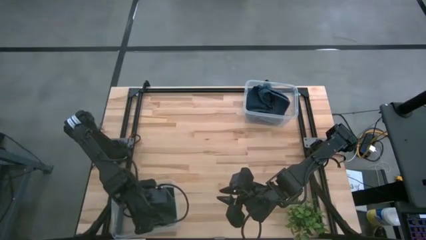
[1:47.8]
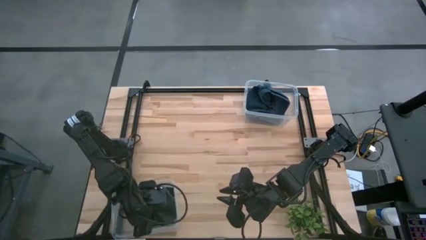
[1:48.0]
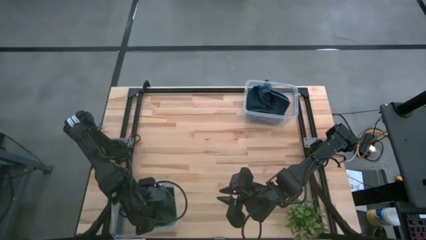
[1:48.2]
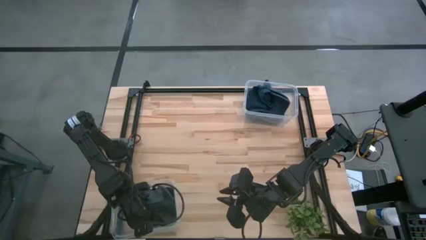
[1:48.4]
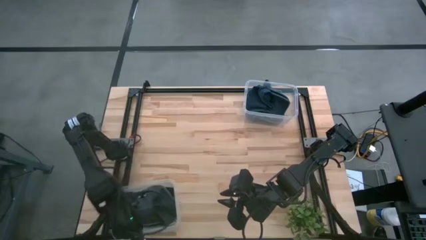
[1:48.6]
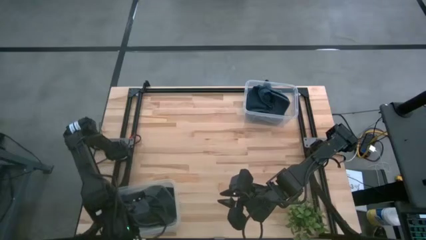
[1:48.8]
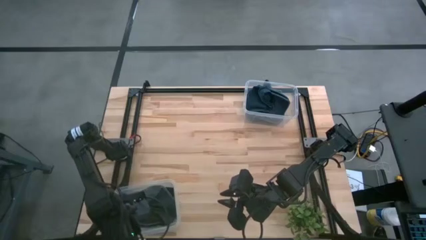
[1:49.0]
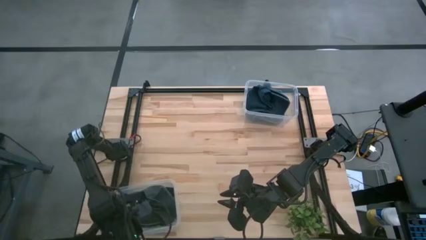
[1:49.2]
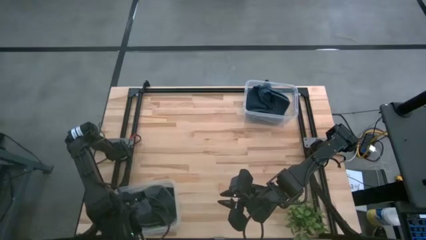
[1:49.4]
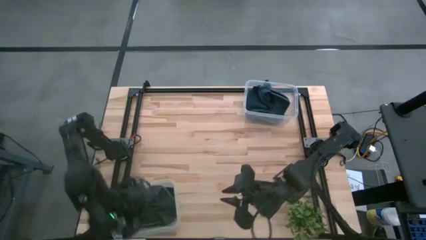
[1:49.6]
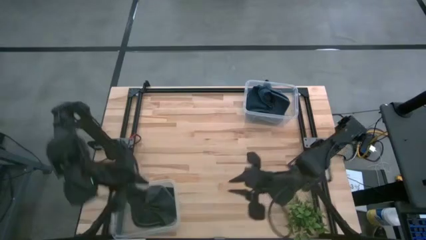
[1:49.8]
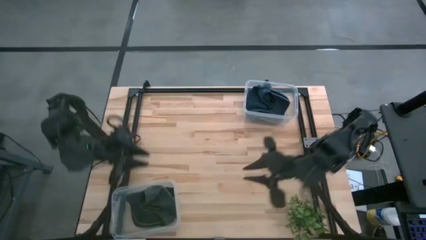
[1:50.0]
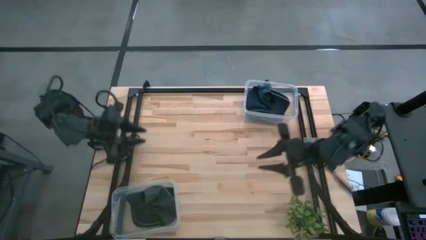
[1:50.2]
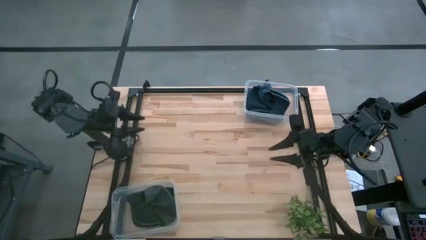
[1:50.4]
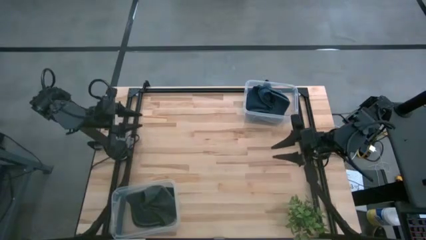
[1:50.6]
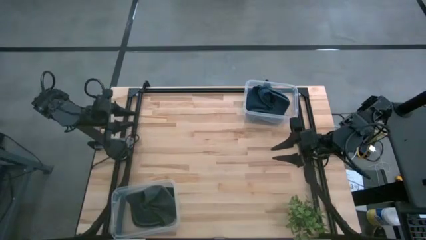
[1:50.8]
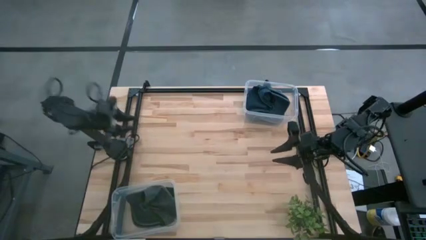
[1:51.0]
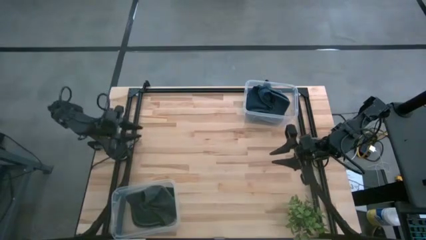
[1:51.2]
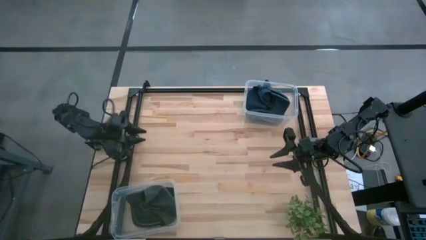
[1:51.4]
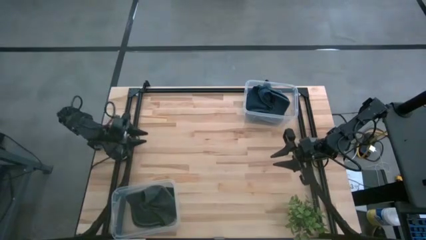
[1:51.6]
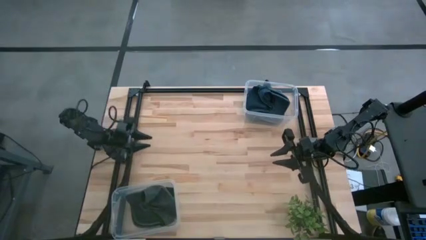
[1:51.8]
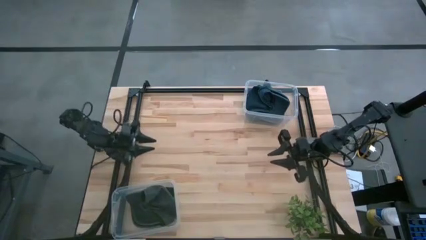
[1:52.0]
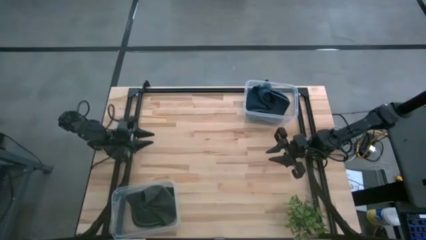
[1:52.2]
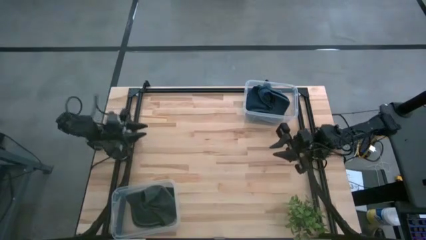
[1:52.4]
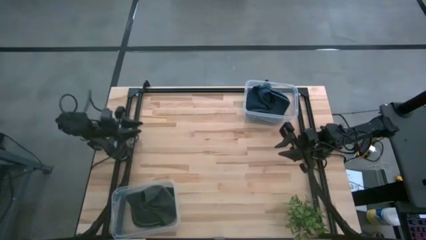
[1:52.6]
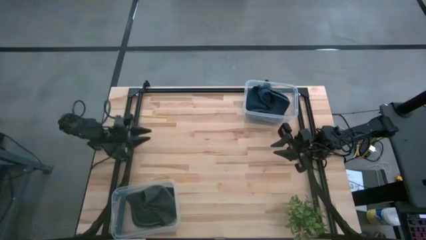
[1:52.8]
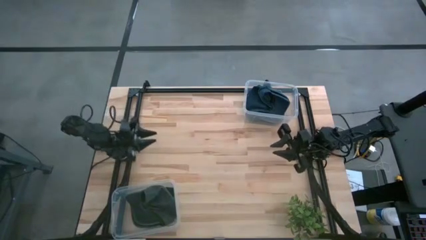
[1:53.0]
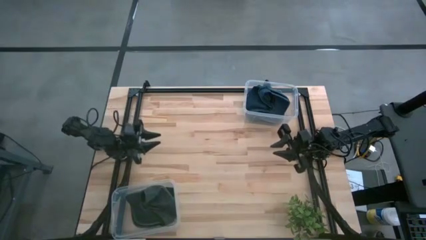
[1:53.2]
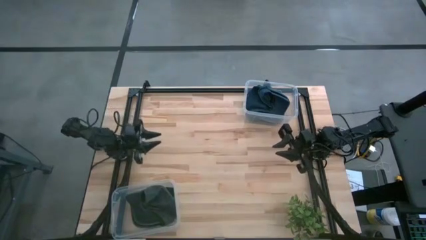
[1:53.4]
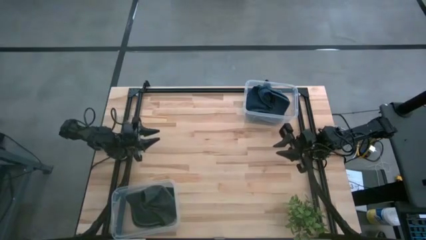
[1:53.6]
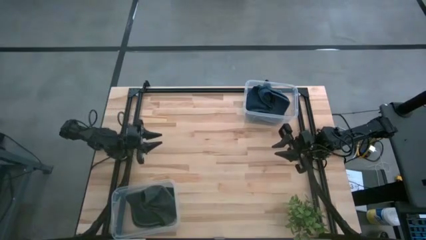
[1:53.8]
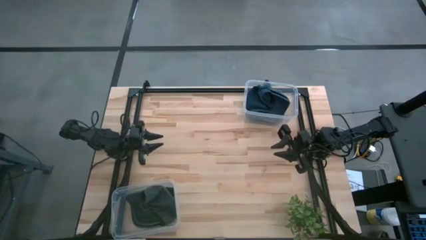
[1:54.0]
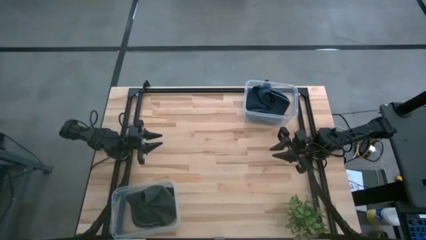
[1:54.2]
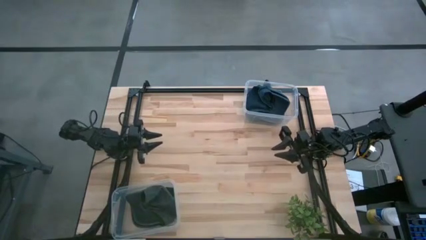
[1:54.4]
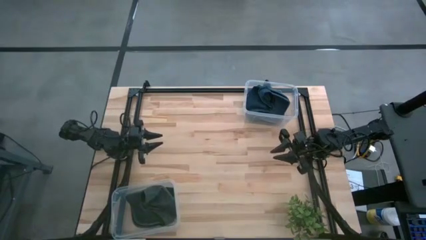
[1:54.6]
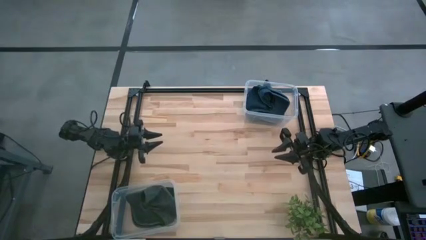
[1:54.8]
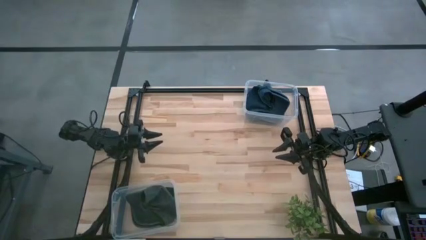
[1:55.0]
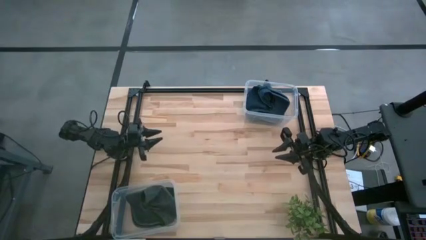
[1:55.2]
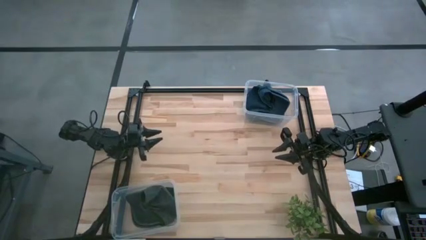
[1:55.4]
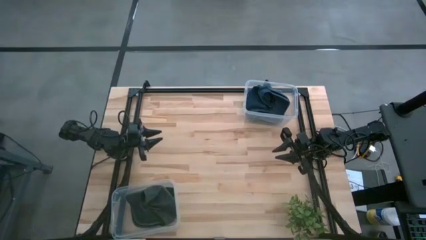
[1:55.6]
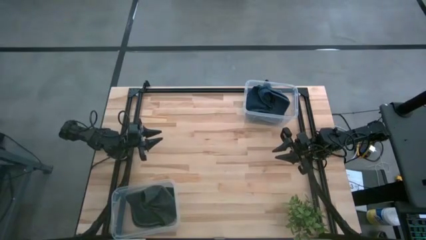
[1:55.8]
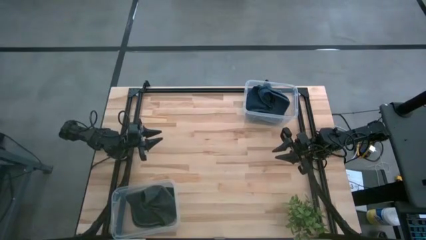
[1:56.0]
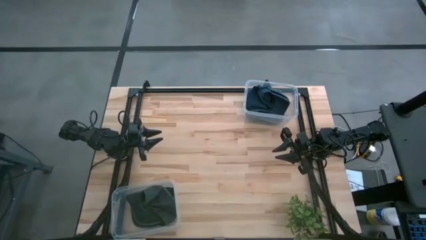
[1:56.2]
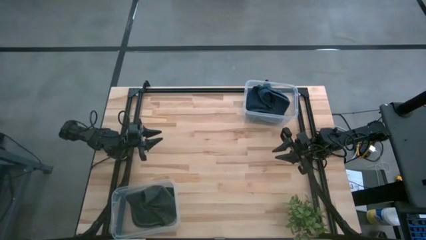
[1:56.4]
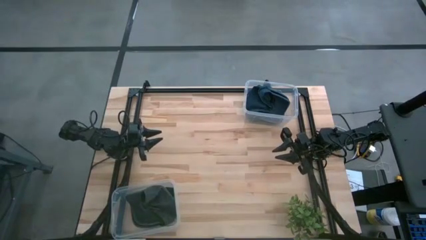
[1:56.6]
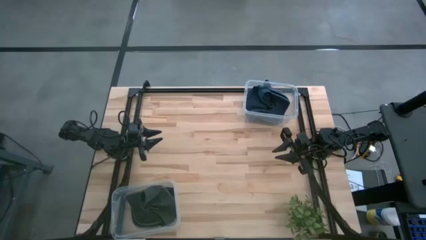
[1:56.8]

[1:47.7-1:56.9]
Task: Pick & Place hat
Return to Home Position

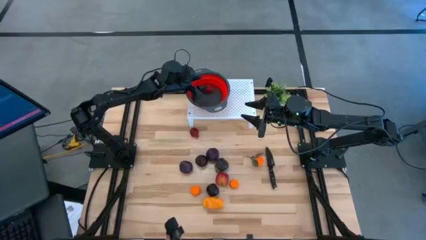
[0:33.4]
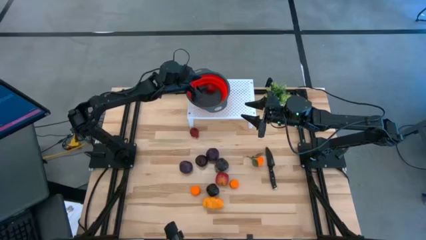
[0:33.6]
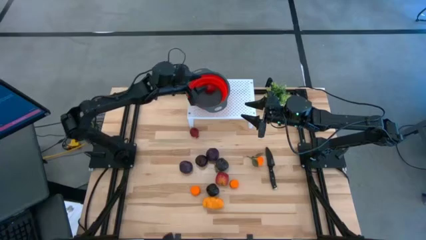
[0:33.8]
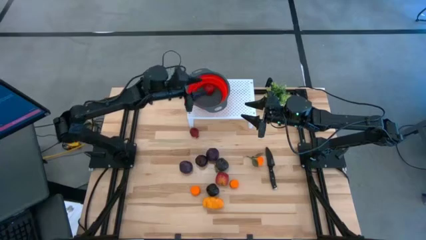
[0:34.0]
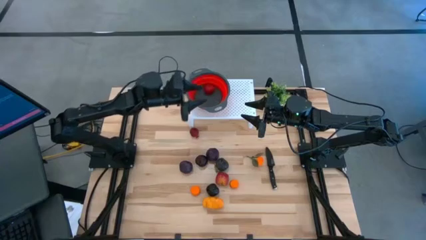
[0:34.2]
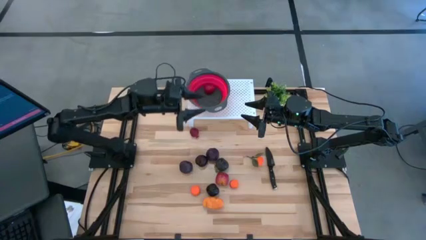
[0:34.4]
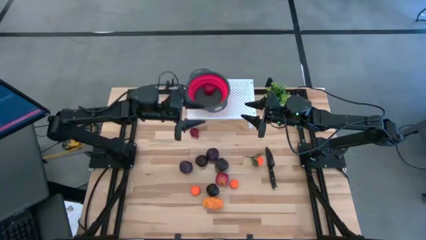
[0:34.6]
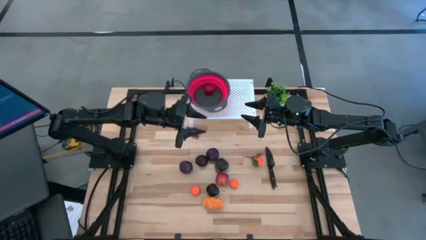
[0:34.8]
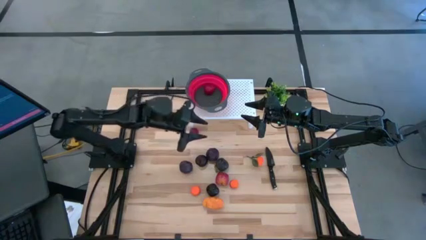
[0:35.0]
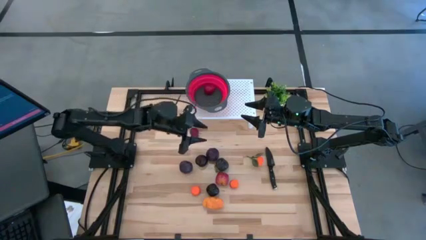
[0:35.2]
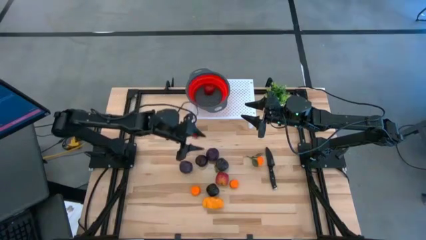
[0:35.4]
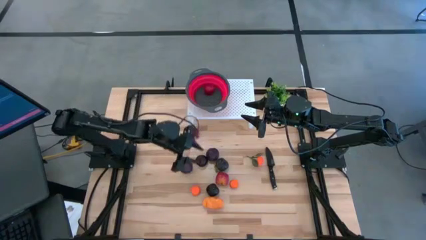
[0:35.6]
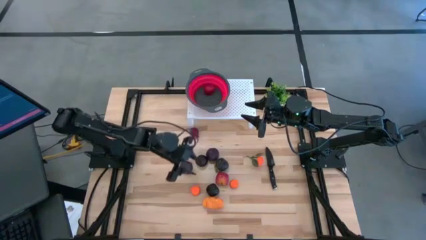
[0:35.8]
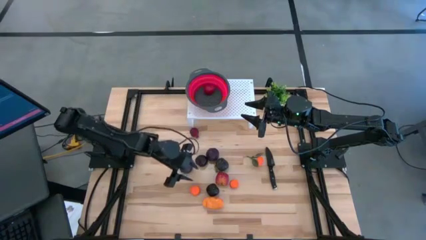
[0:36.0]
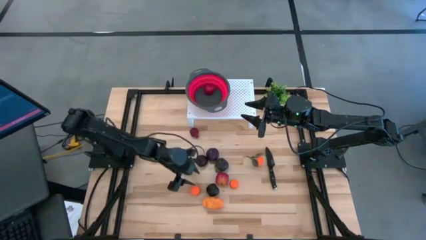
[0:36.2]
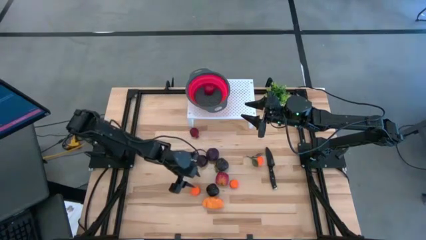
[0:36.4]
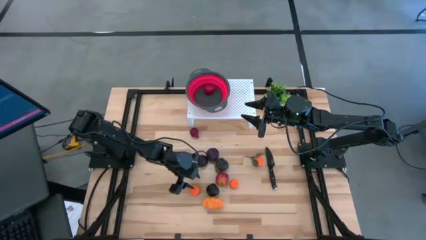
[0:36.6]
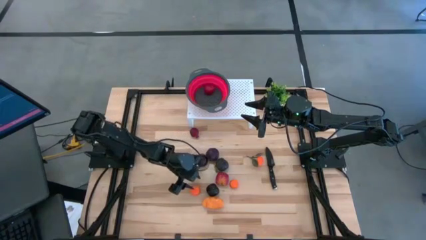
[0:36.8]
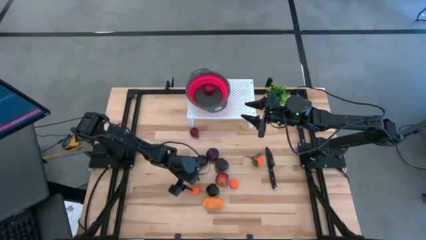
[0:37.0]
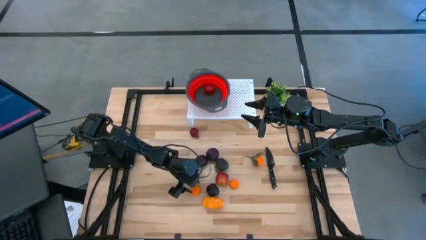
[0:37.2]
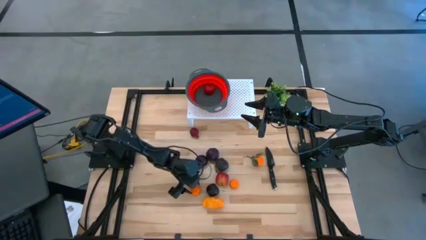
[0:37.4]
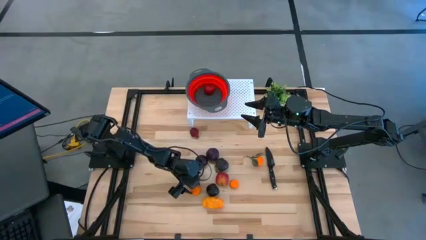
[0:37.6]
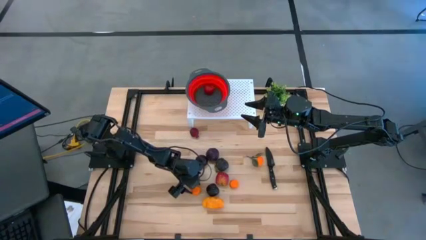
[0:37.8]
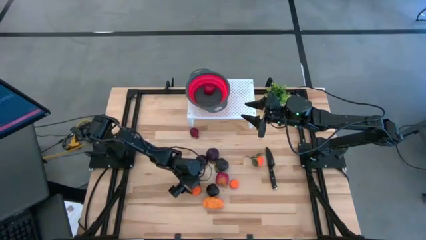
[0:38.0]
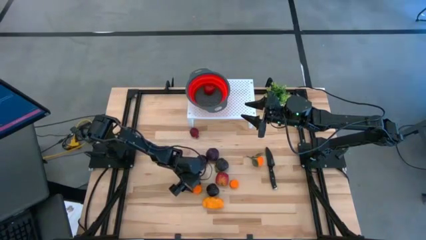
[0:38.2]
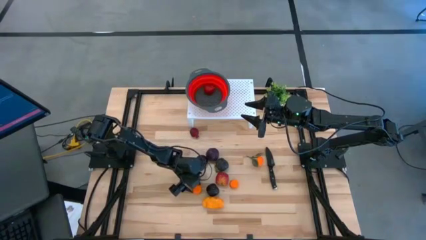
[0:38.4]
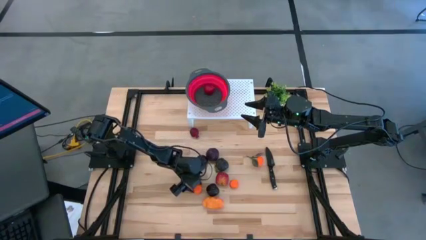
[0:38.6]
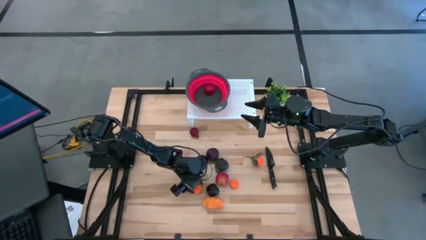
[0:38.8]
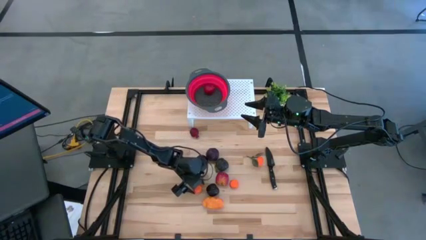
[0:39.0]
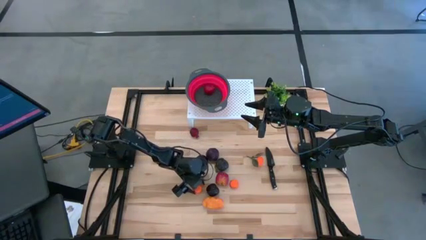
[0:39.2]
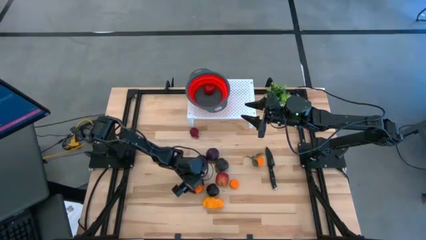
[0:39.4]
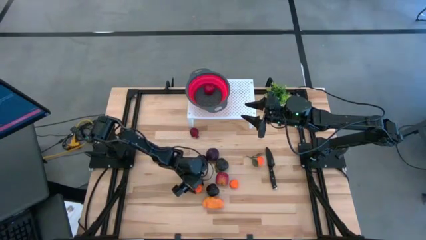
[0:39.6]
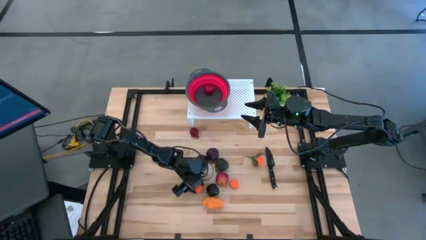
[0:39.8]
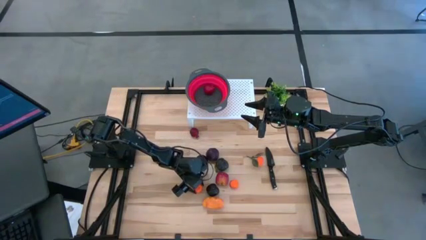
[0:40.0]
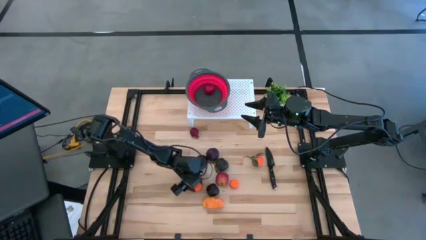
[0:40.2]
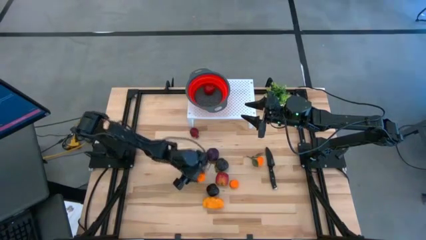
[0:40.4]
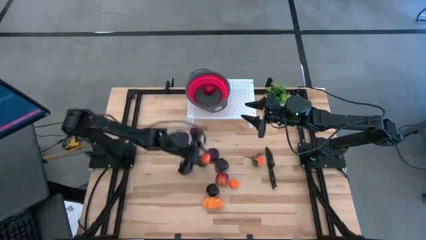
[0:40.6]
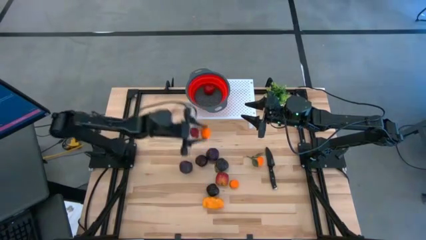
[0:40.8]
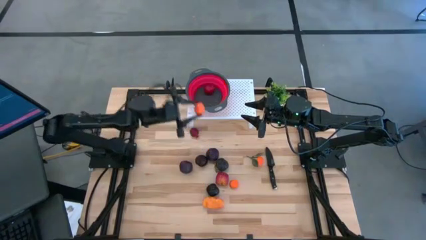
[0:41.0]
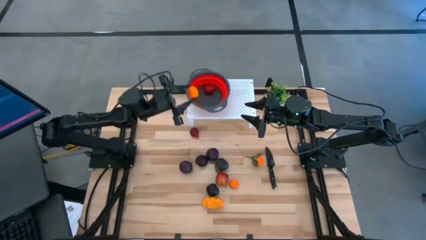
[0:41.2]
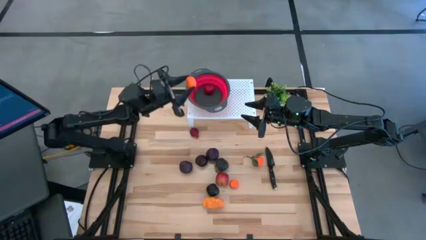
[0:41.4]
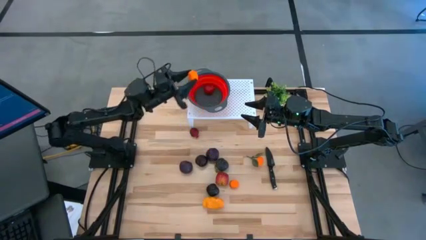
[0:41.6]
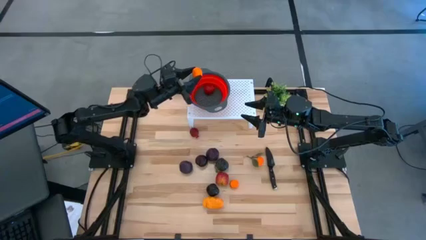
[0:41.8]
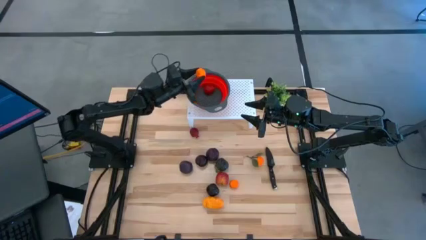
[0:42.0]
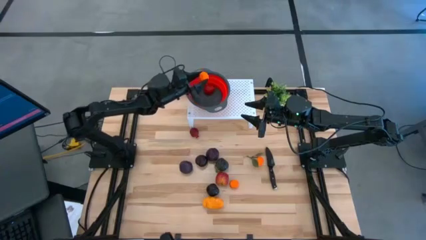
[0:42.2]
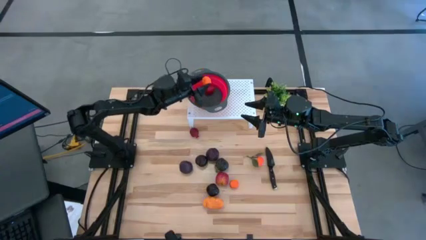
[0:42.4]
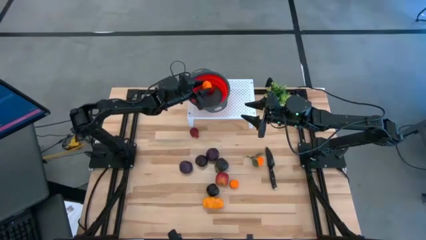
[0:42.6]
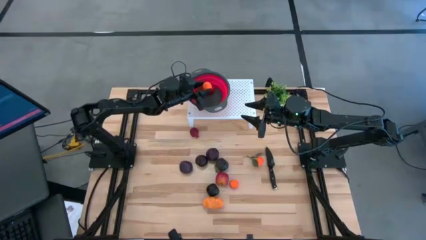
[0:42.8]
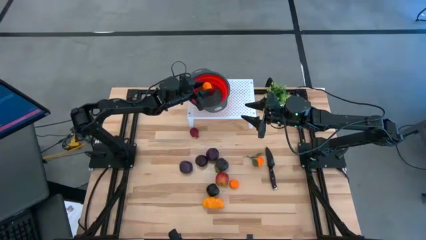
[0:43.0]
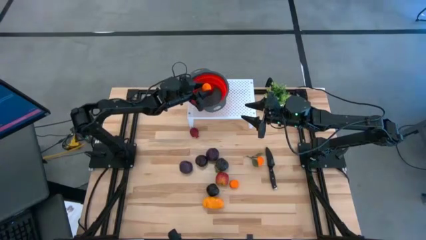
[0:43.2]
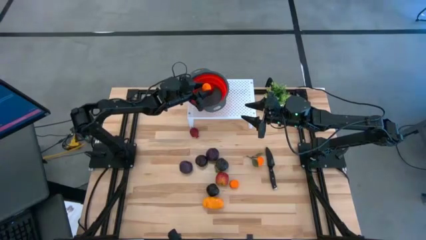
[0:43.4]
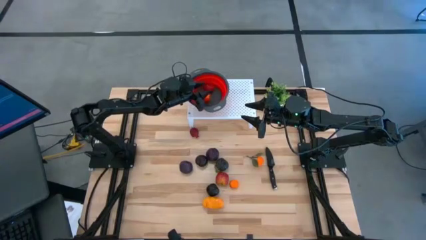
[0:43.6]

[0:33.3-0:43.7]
Task: Pick & Place Fruit
Put the left tangerine into the strainer bowl on the shelf
